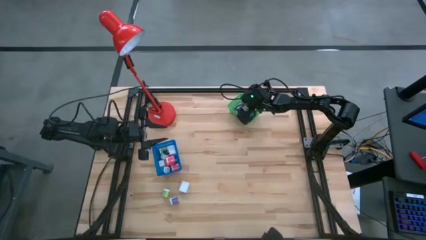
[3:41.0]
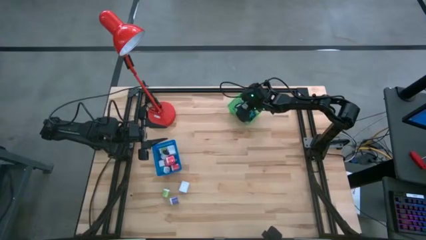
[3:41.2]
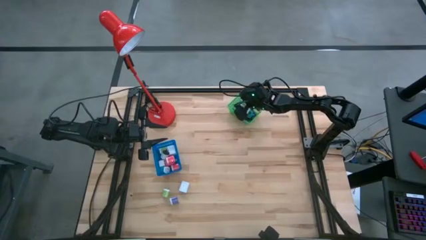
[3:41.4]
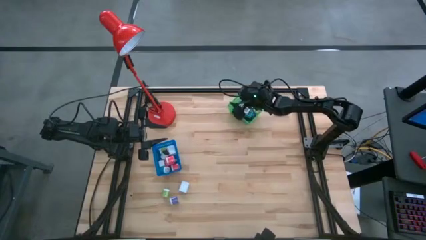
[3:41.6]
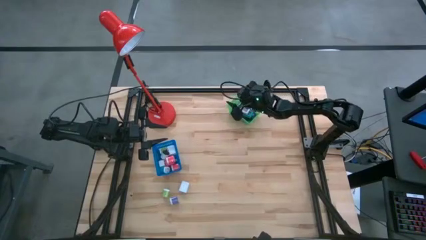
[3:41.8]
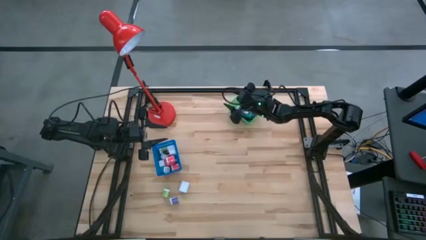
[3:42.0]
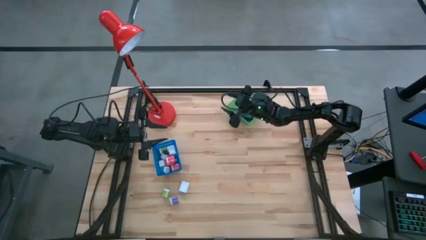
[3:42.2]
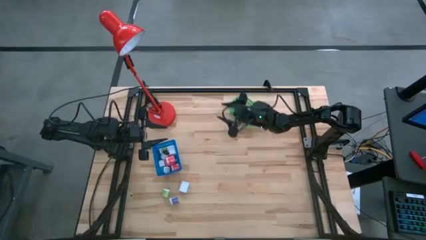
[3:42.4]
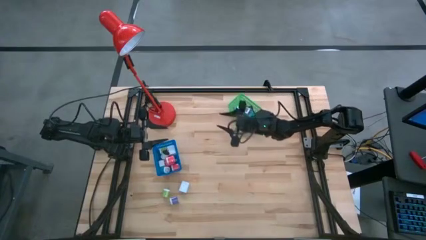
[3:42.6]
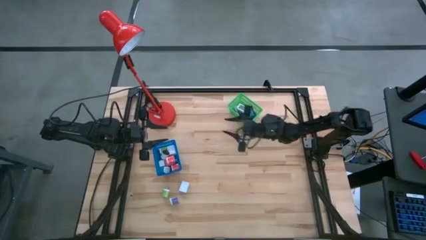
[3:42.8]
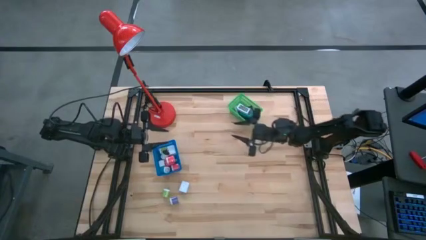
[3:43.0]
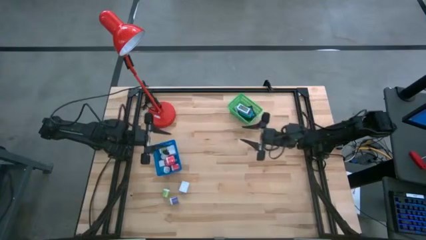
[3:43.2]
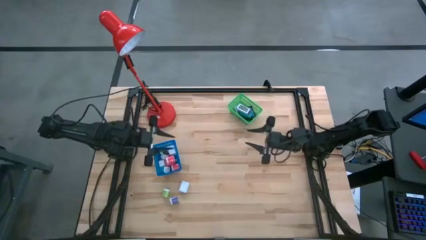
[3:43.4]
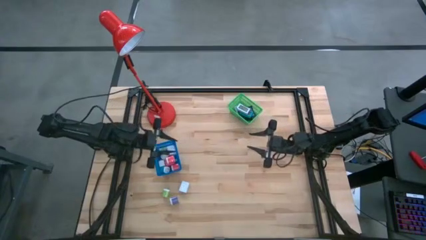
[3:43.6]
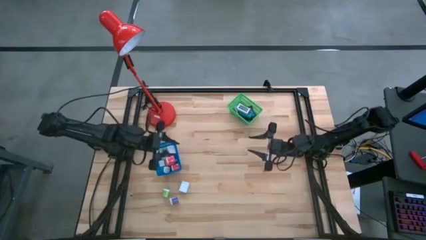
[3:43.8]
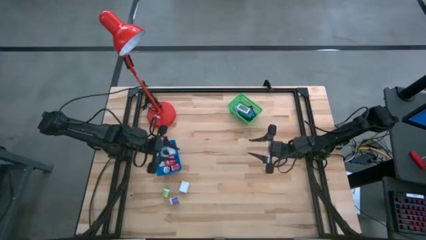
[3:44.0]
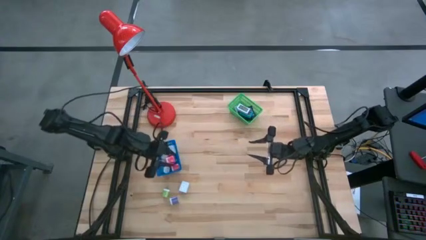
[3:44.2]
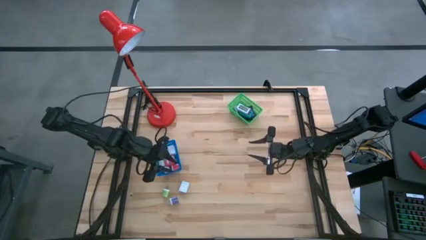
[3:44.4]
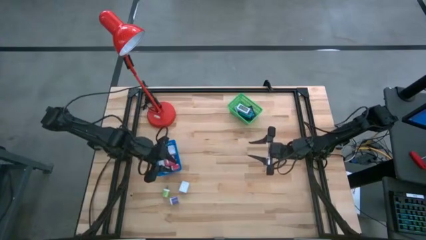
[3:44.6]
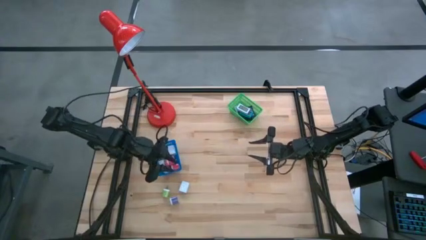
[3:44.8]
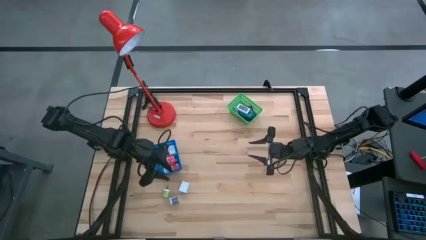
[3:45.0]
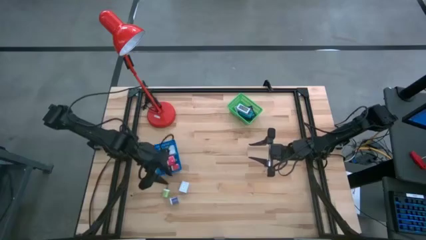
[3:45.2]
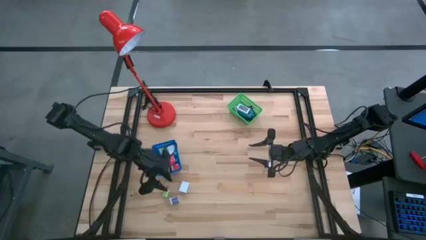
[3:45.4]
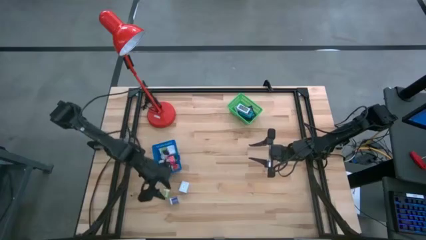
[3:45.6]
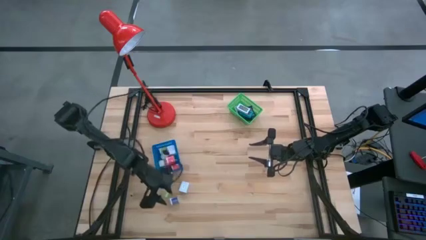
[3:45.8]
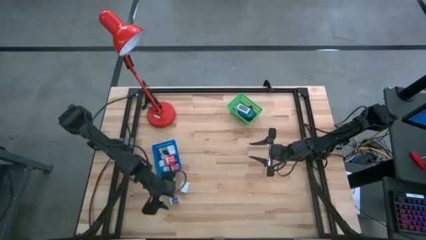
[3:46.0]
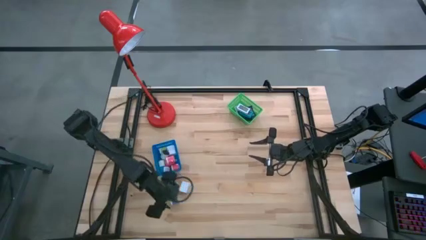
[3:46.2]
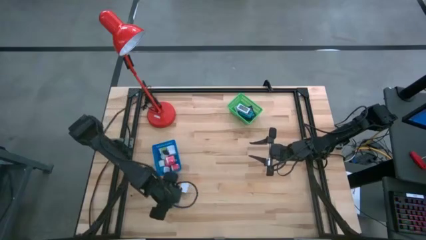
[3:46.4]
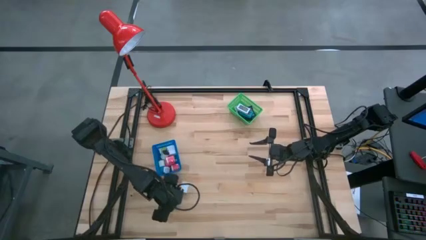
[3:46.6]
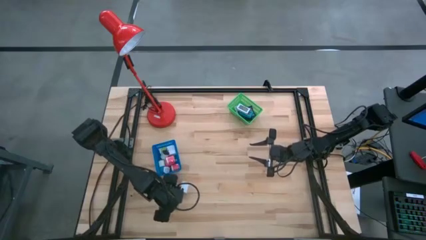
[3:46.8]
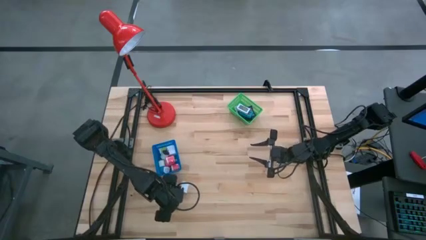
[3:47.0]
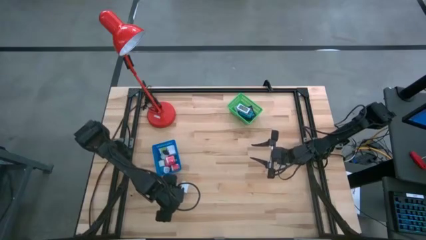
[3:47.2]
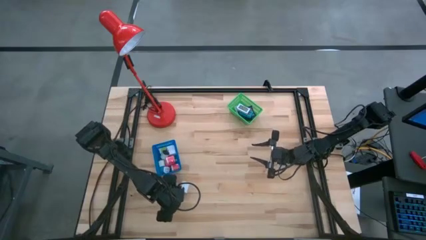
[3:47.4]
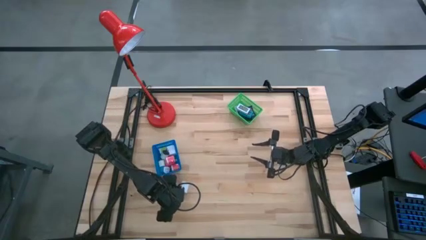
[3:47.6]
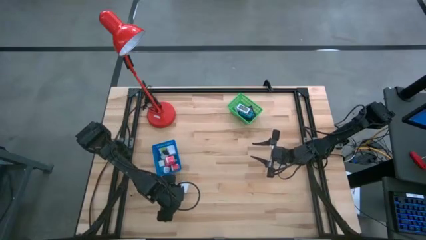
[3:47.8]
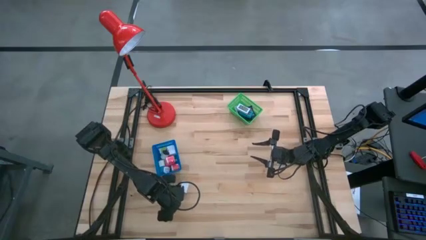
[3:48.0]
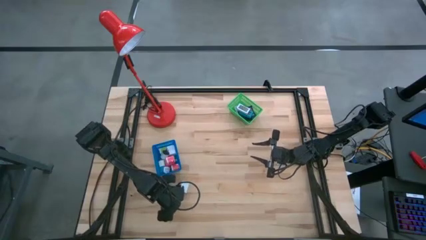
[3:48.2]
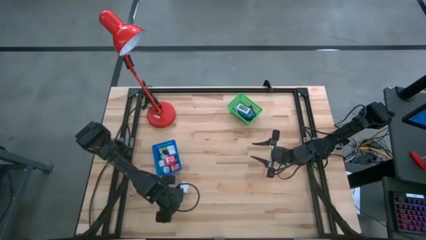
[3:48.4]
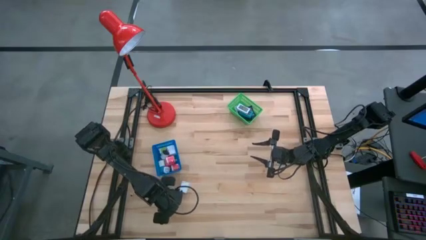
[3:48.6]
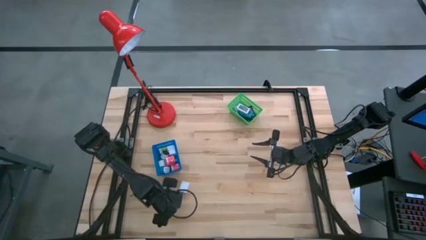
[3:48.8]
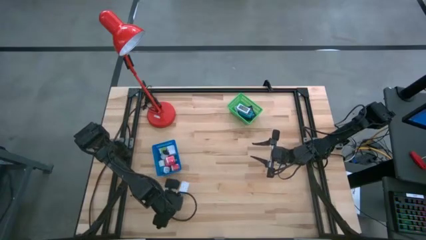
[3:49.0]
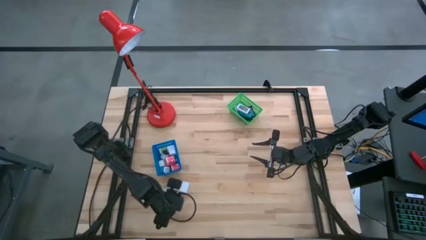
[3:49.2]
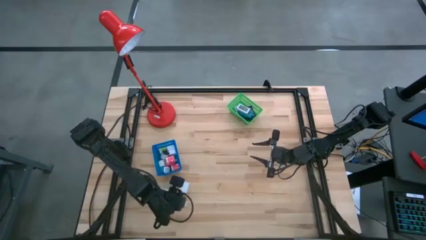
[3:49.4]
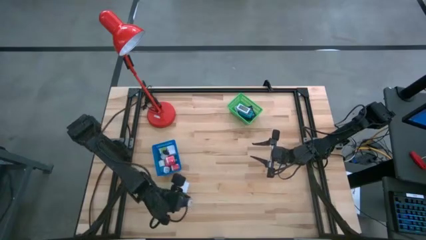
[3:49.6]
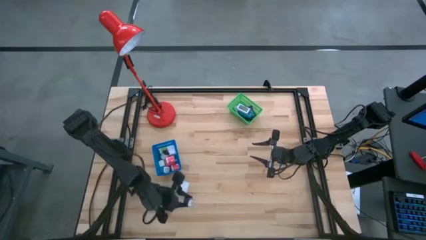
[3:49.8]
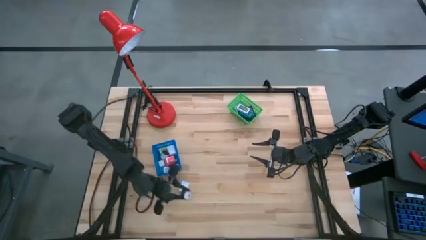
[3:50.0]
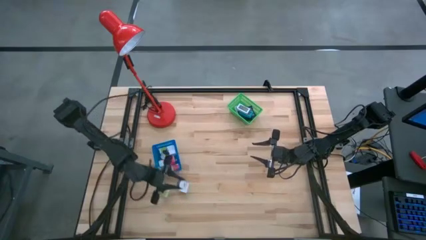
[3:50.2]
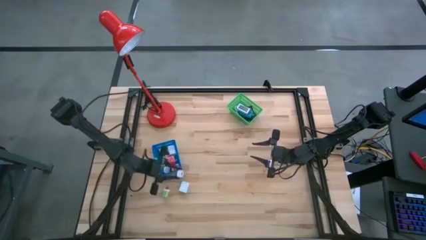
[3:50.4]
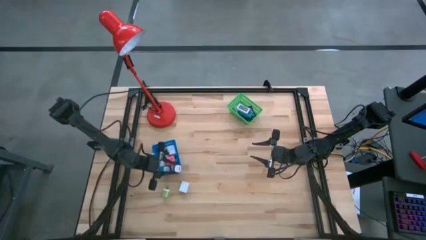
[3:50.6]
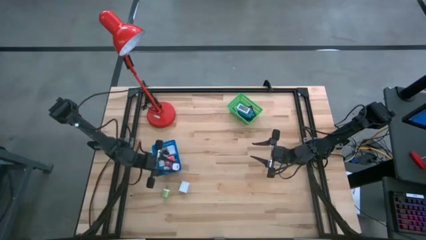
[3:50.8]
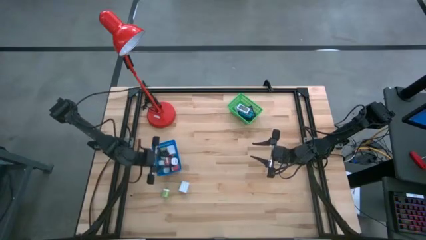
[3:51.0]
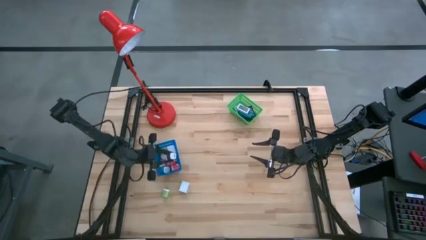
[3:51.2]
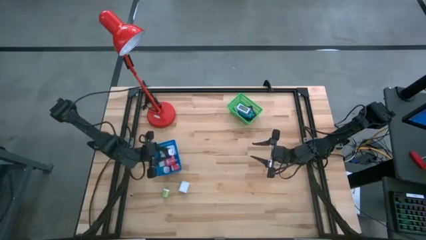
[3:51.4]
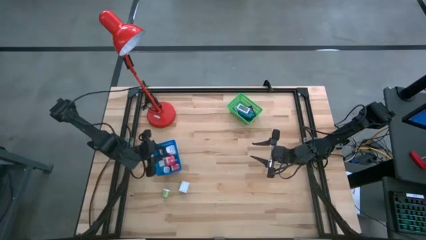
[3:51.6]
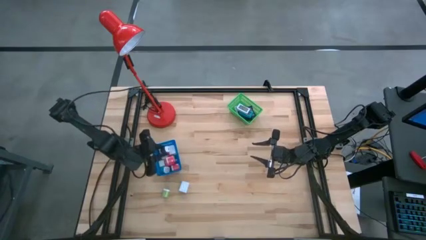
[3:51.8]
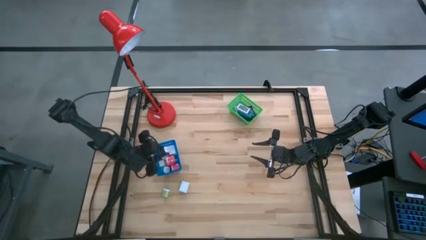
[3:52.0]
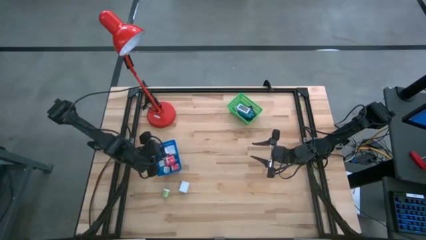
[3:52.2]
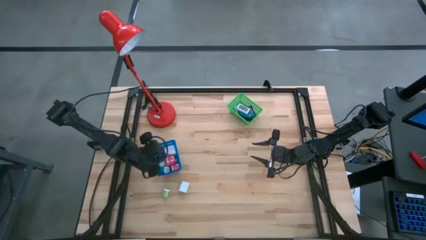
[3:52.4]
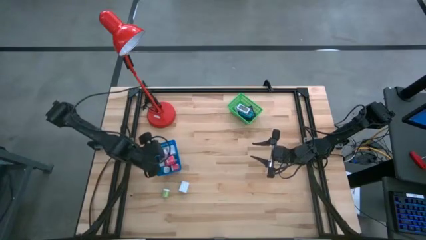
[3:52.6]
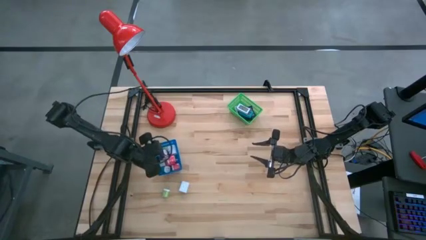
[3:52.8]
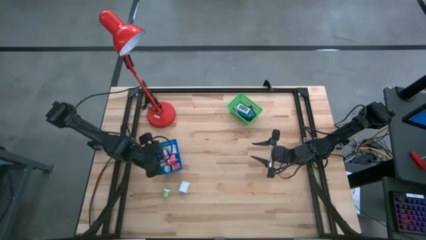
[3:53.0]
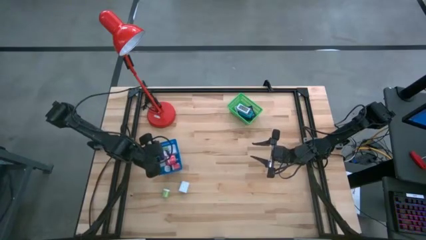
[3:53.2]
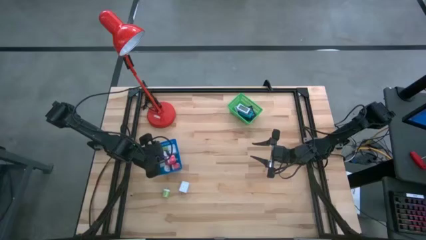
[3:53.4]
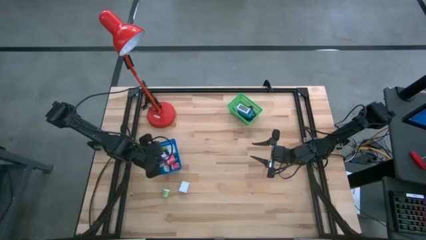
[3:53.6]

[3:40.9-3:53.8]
Task: Pick & Place Office items
Put the purple charger adapter into the blue basket
